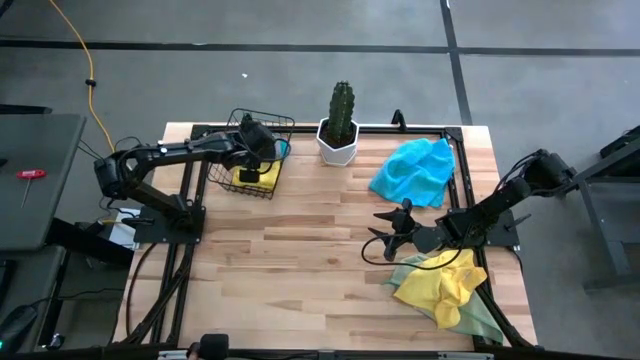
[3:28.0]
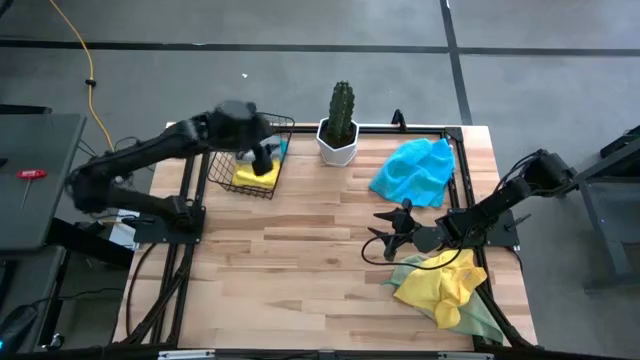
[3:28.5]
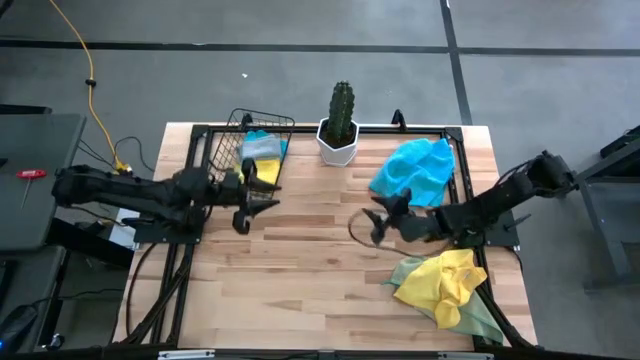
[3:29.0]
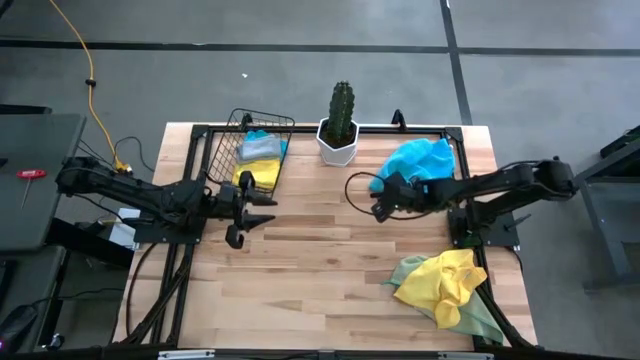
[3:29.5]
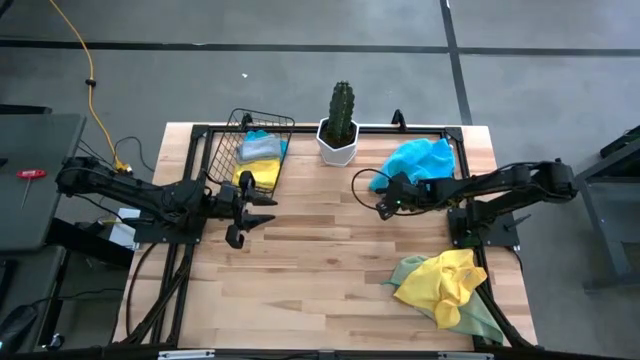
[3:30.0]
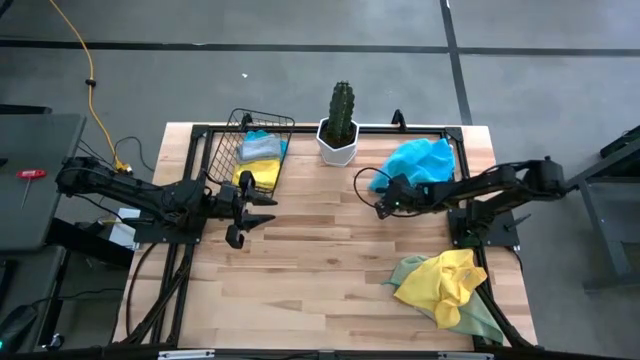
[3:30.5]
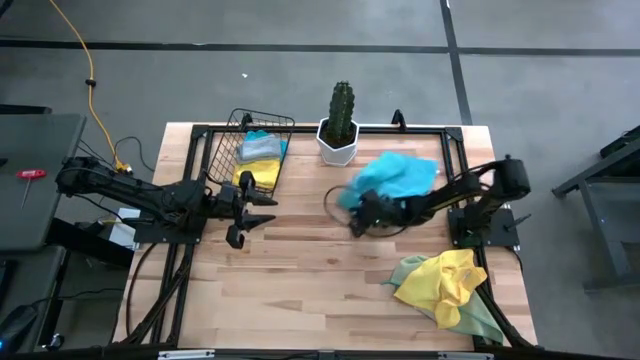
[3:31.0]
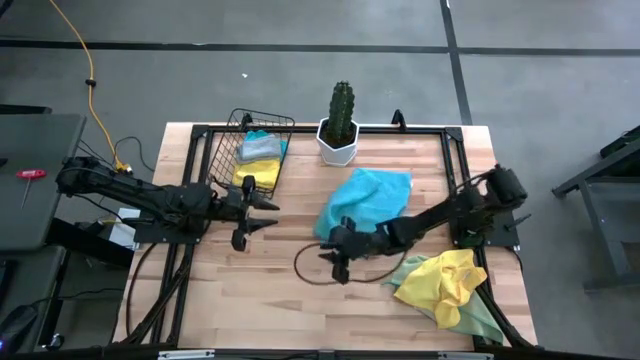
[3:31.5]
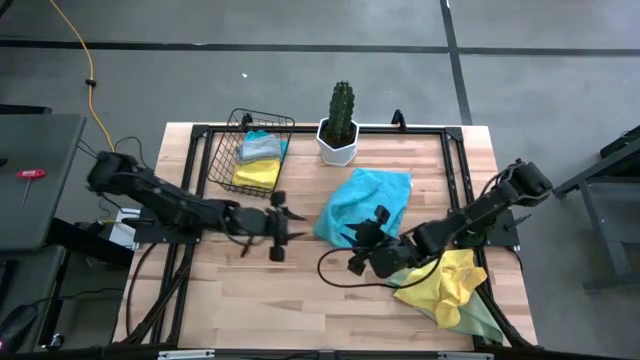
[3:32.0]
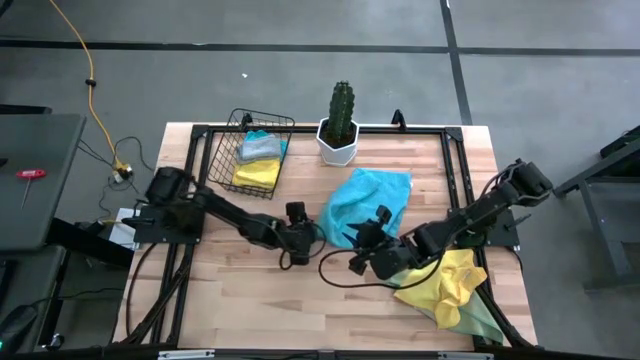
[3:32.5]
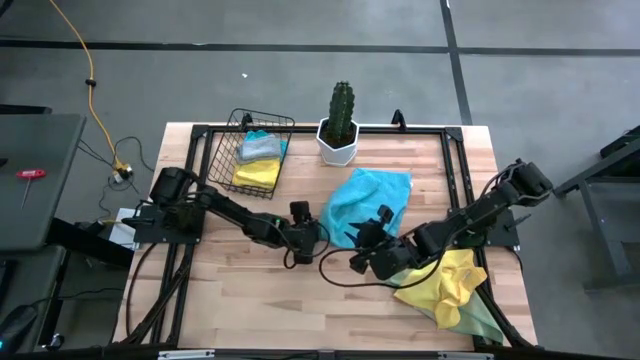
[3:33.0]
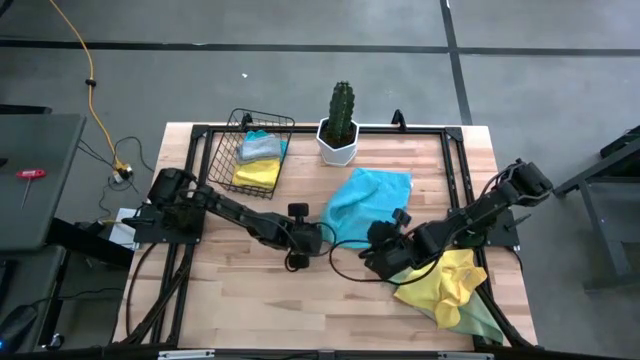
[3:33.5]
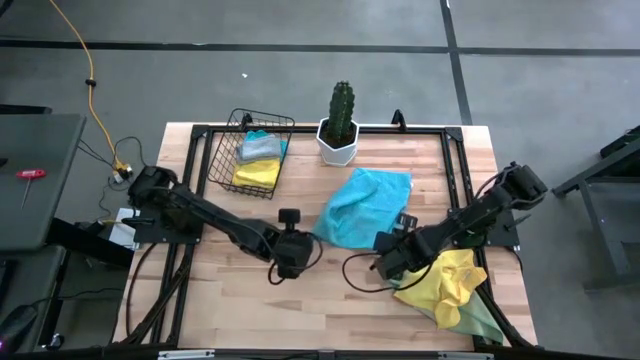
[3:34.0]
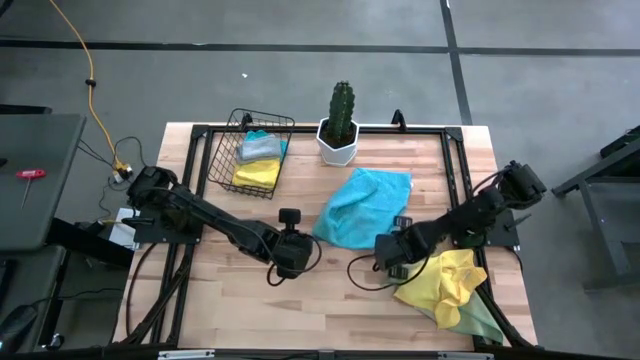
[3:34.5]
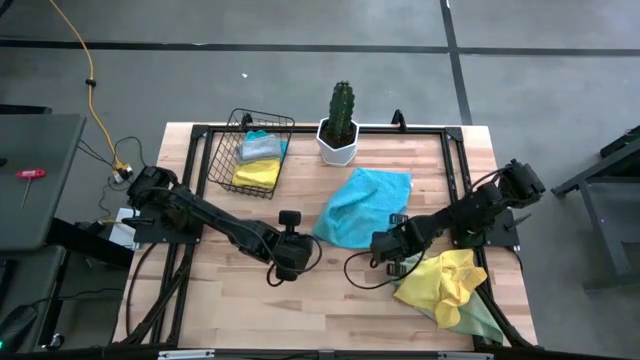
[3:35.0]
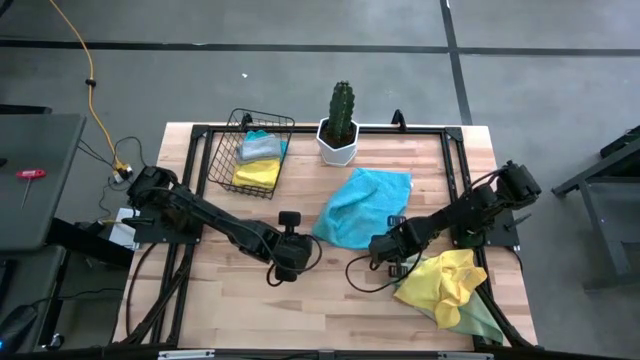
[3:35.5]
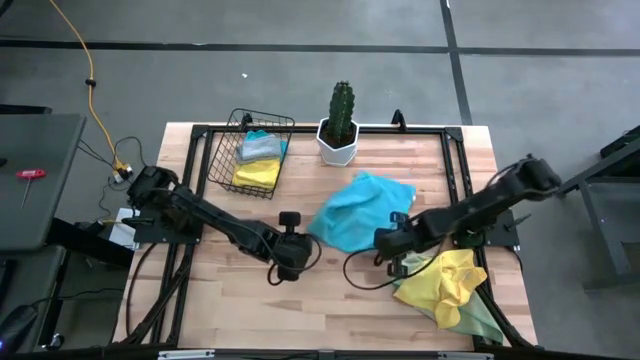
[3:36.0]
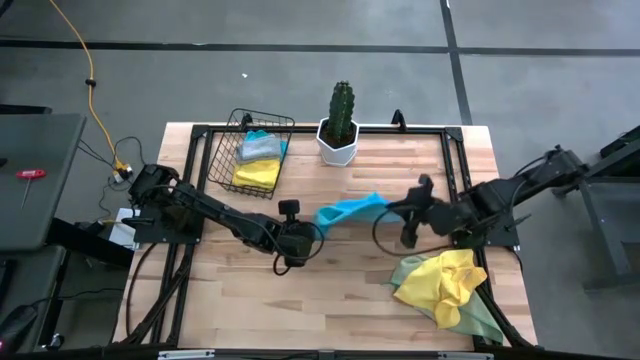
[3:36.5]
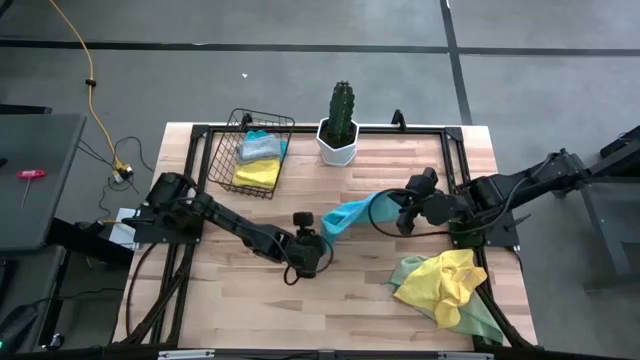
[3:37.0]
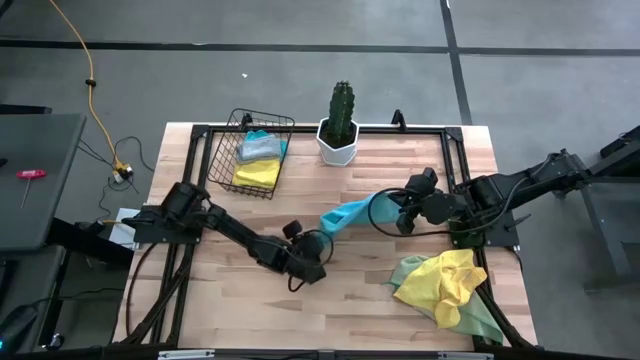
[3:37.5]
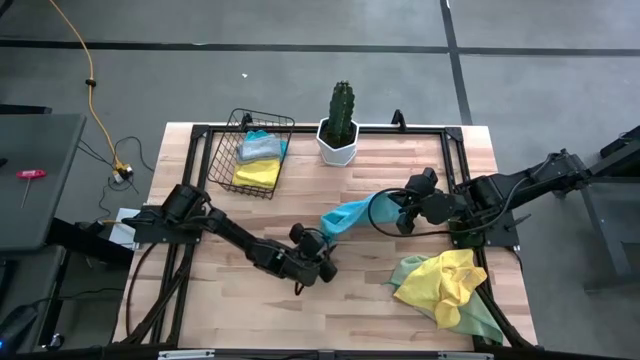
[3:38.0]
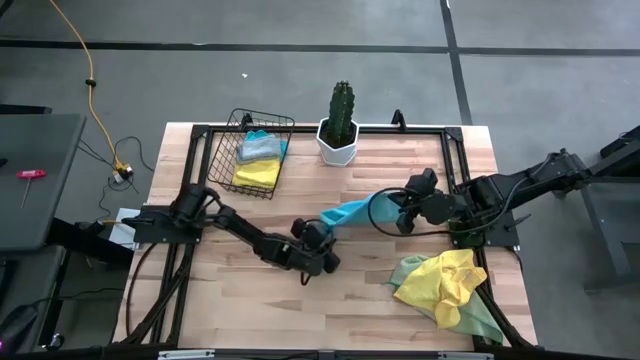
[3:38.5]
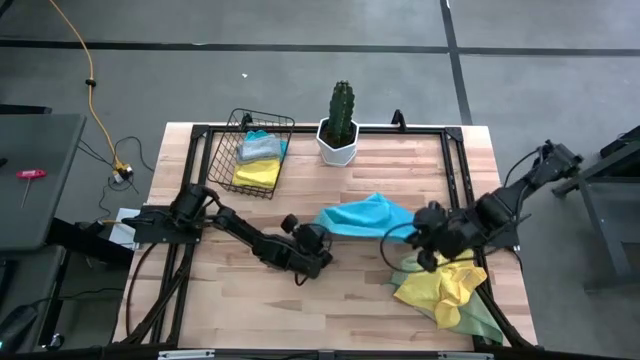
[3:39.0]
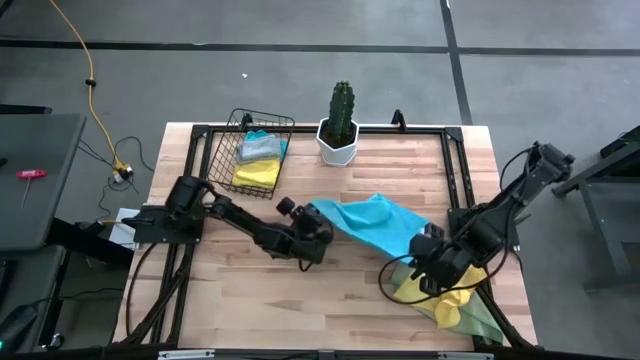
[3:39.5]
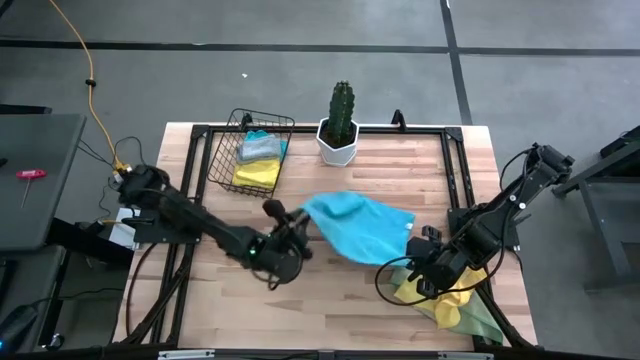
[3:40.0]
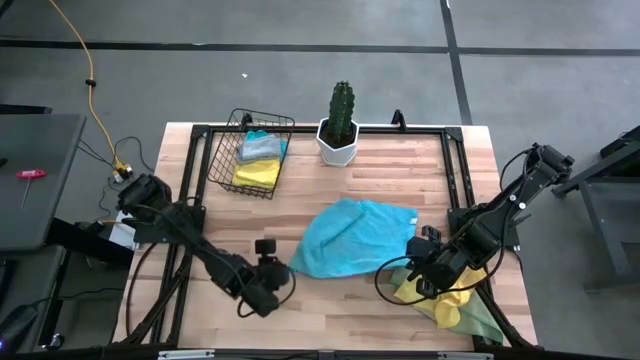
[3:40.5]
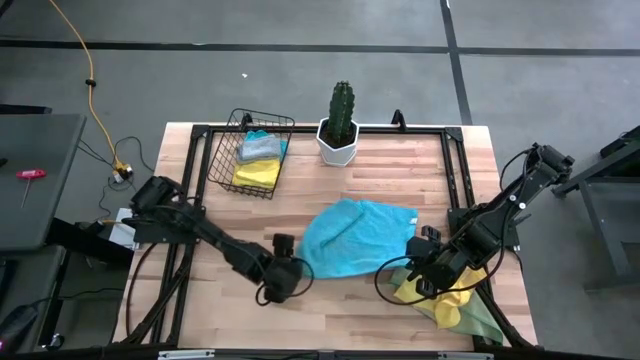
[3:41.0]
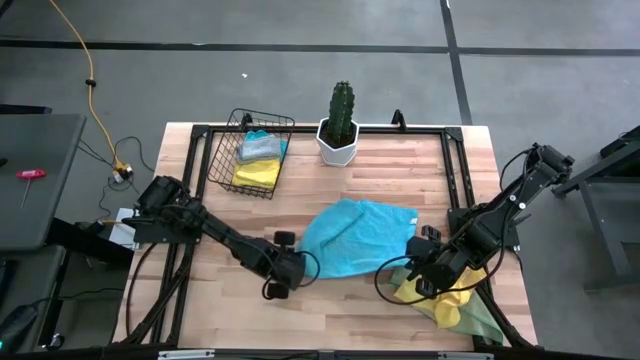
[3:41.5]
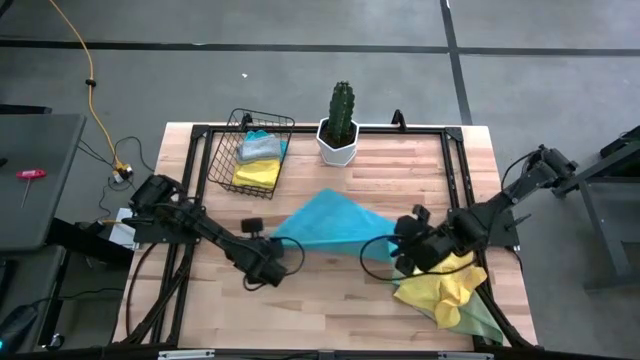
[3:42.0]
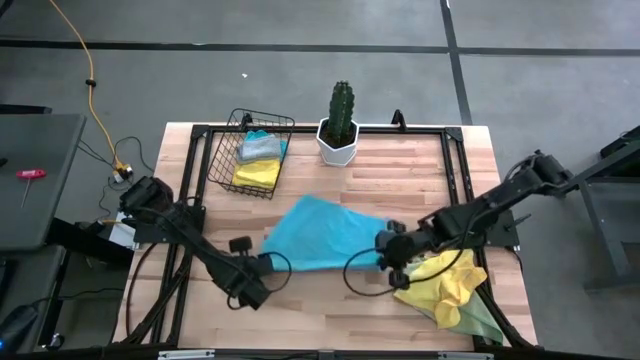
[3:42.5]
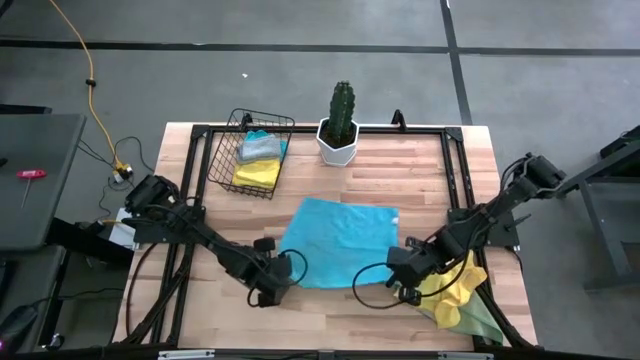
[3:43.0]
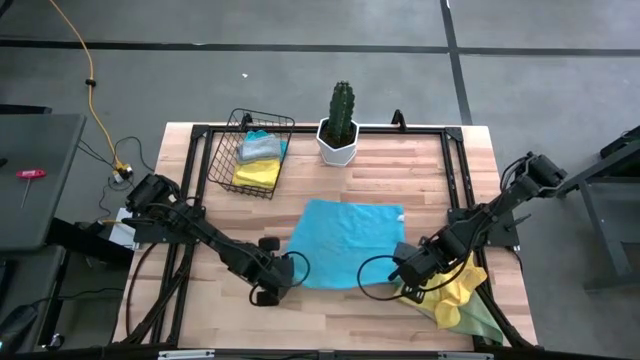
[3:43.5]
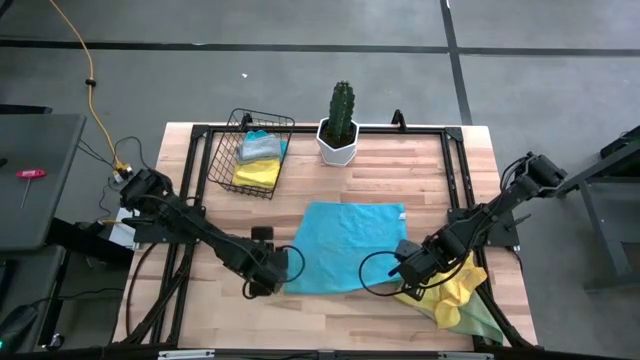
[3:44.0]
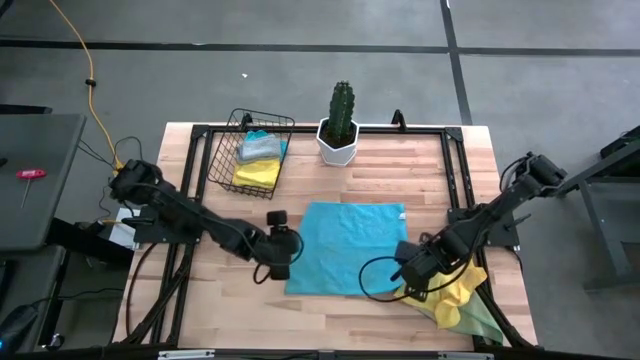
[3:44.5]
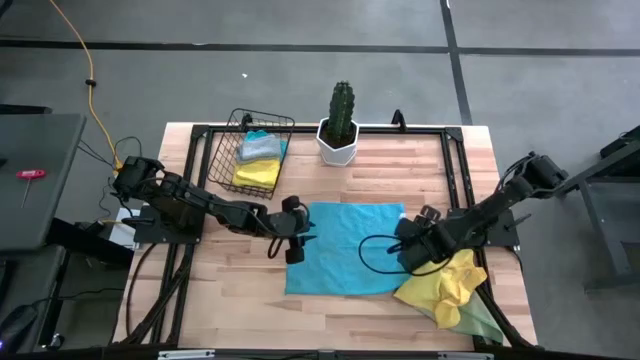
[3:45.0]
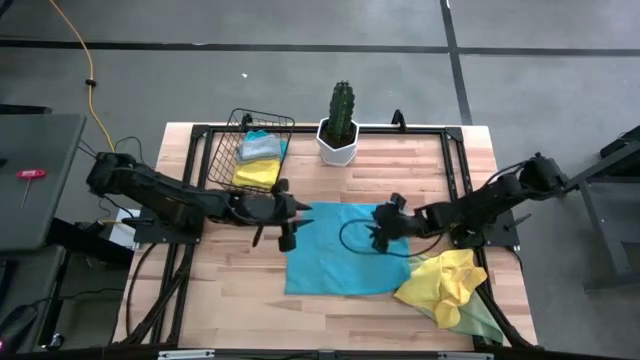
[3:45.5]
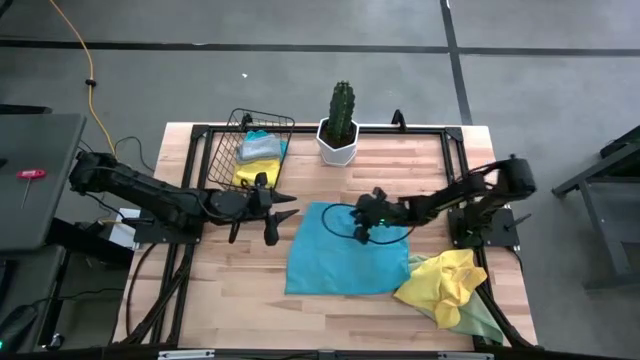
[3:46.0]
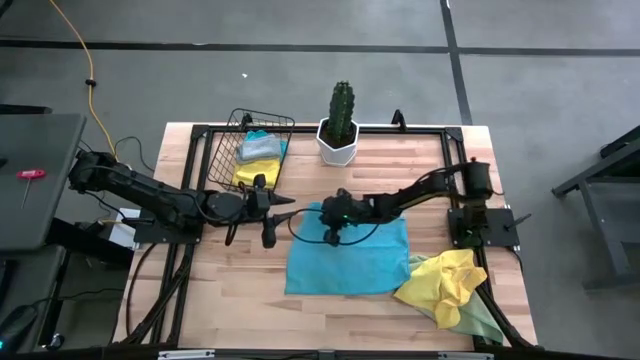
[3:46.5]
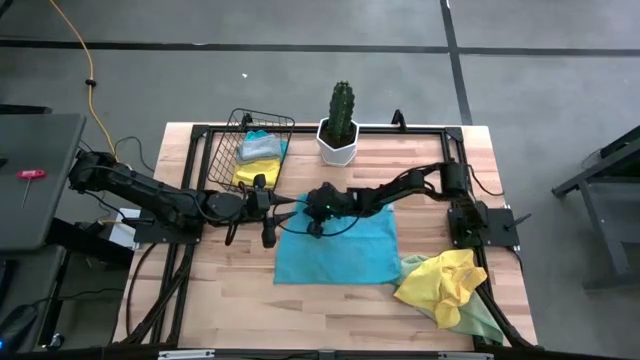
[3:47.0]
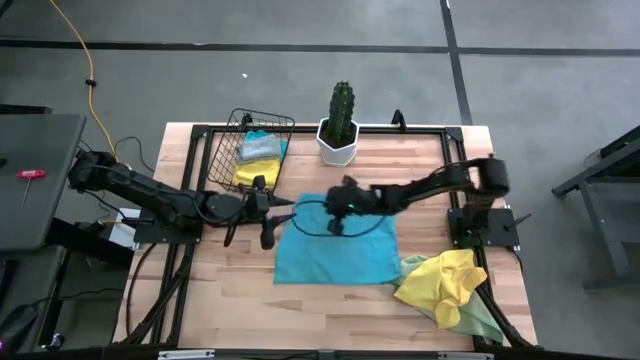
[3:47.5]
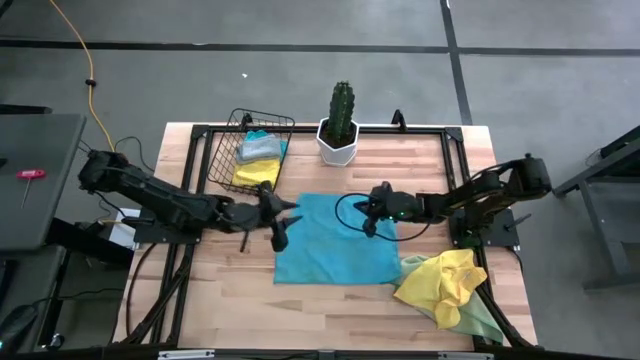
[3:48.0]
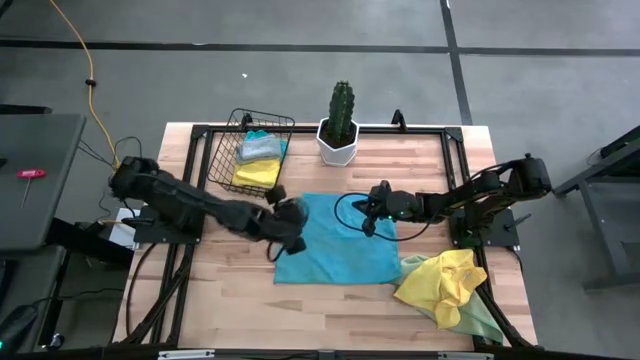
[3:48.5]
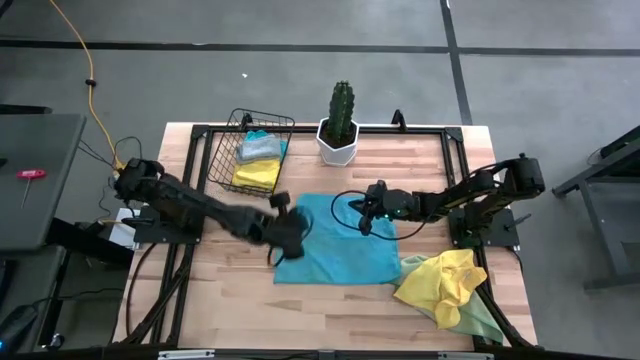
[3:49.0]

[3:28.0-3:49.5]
Task: Fold microfiber towels
Fold the blue microfiber towel on the table

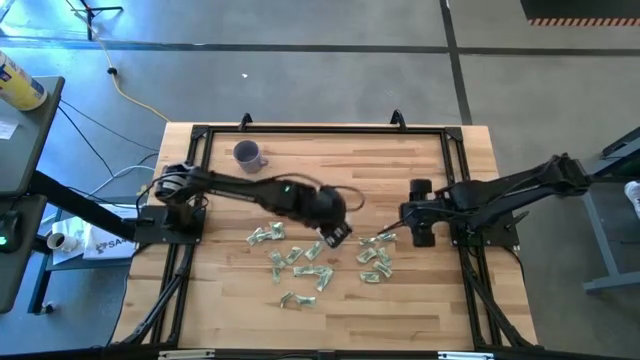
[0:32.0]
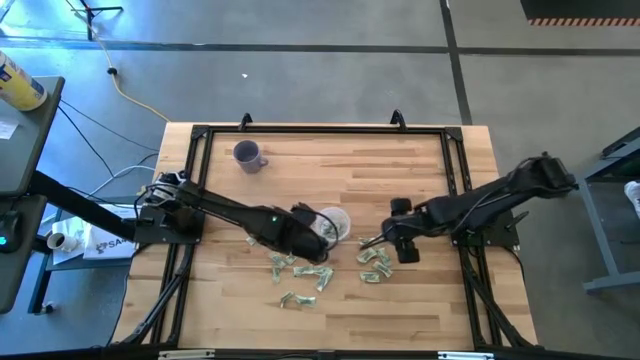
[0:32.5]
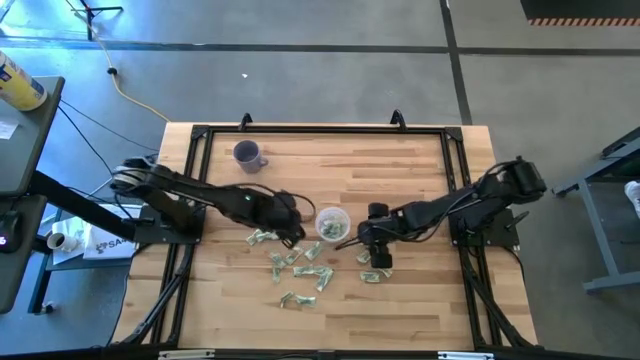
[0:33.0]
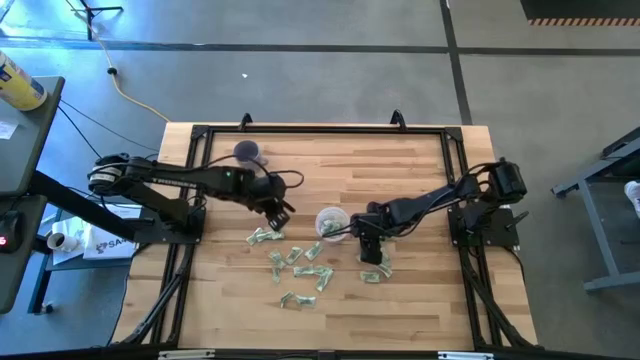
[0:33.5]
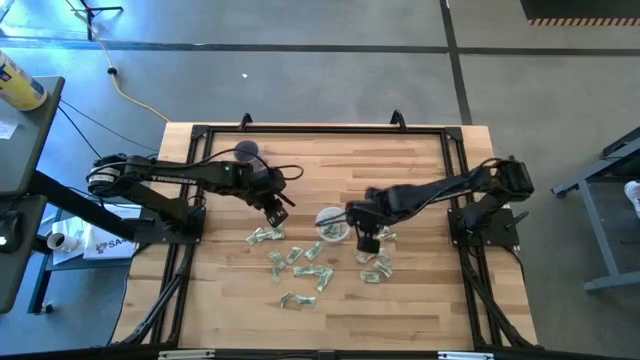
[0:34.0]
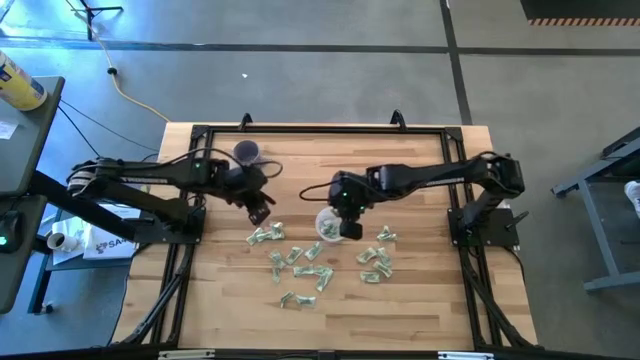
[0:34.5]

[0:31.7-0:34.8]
Task: Pick and place Stevia / Truvia into bins
Put the stevia packet into the transparent container
